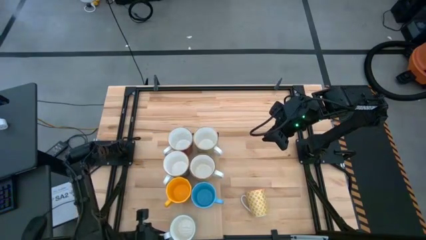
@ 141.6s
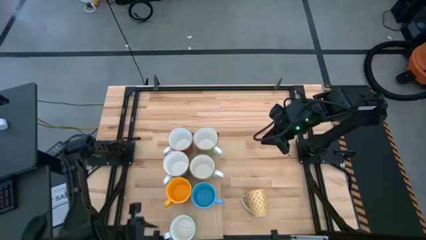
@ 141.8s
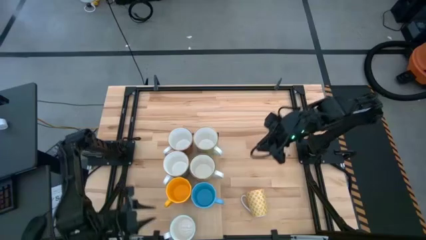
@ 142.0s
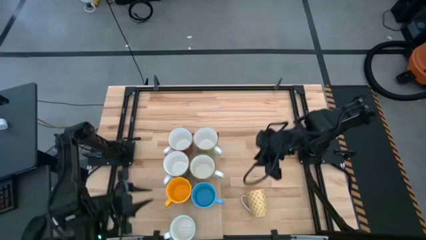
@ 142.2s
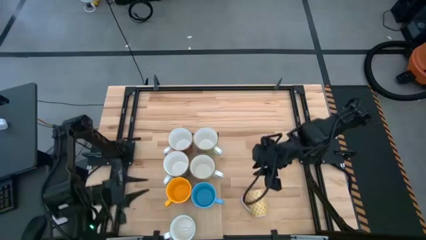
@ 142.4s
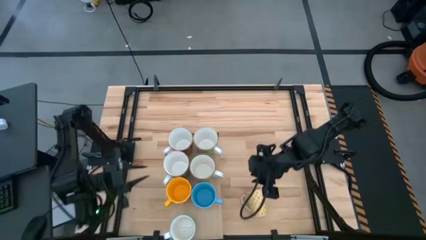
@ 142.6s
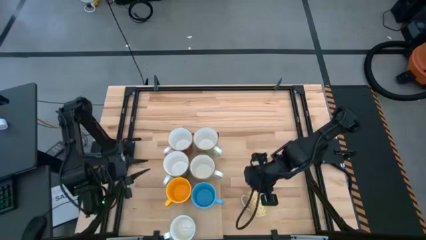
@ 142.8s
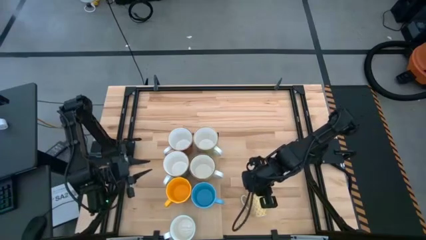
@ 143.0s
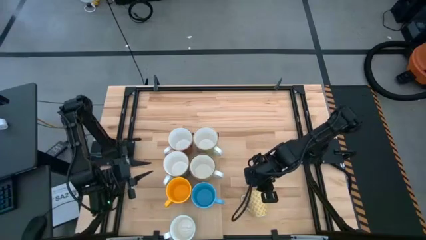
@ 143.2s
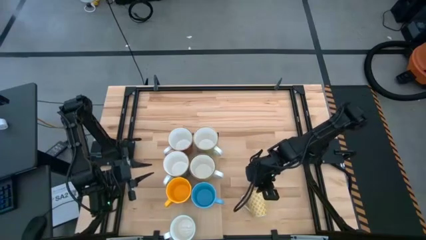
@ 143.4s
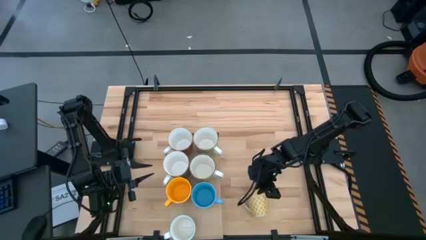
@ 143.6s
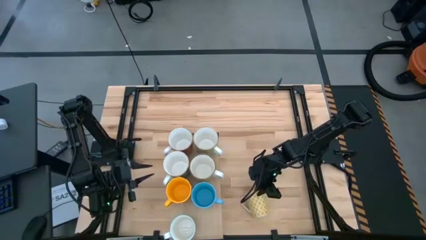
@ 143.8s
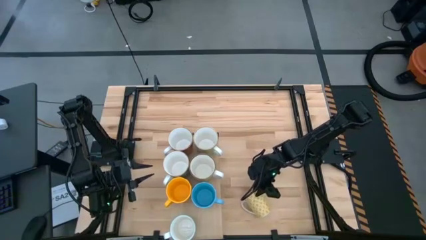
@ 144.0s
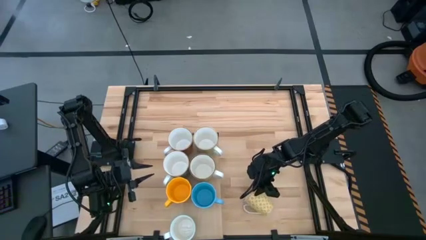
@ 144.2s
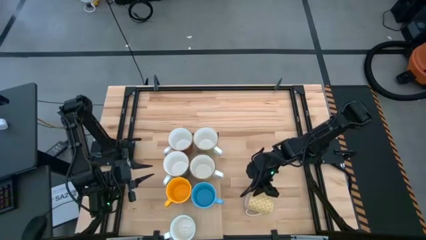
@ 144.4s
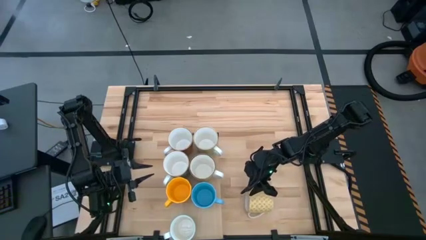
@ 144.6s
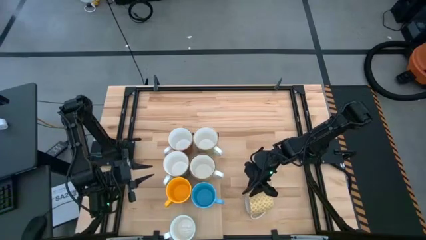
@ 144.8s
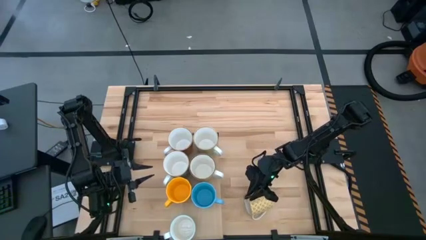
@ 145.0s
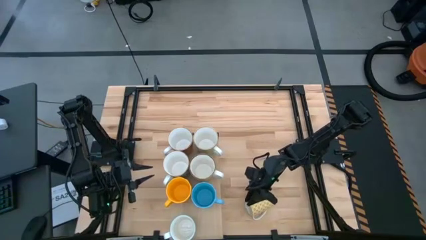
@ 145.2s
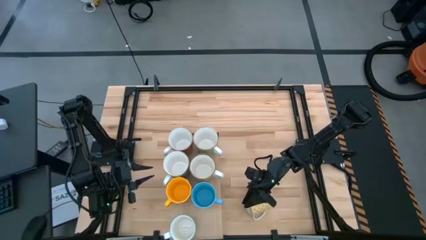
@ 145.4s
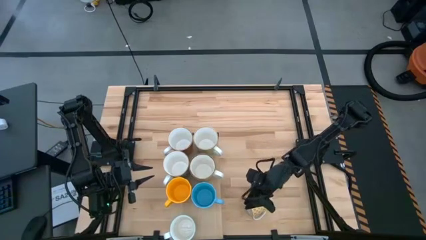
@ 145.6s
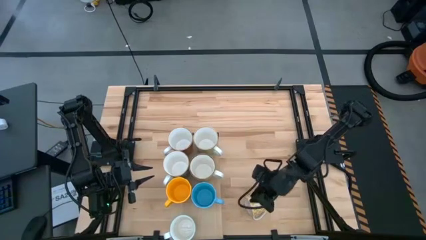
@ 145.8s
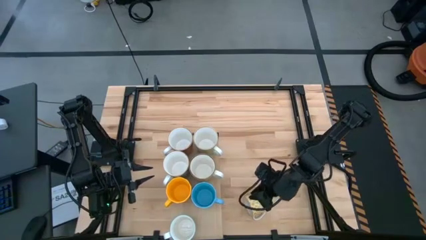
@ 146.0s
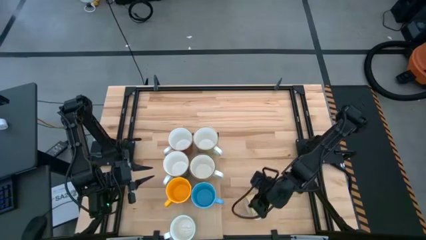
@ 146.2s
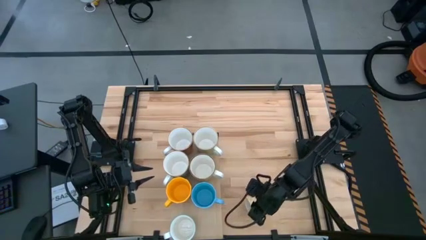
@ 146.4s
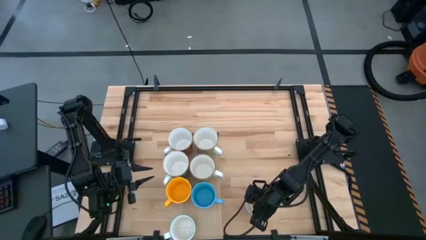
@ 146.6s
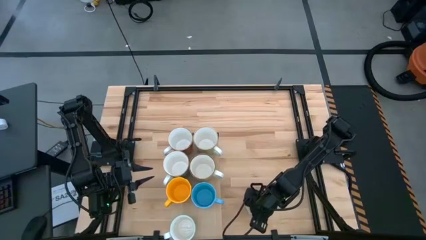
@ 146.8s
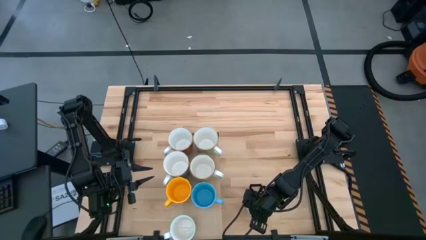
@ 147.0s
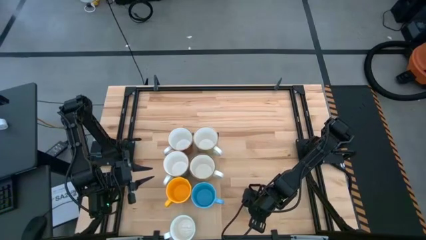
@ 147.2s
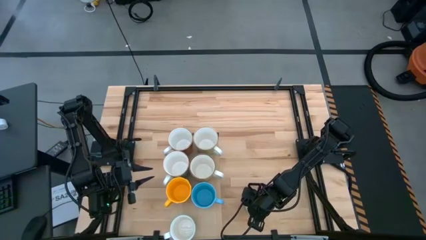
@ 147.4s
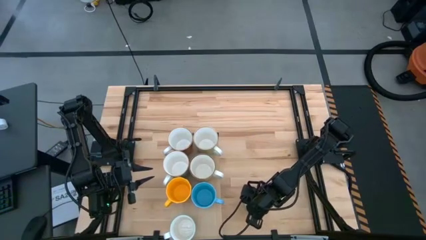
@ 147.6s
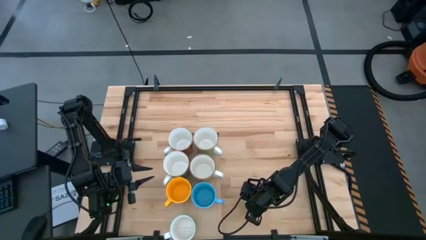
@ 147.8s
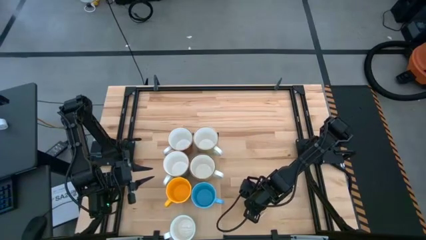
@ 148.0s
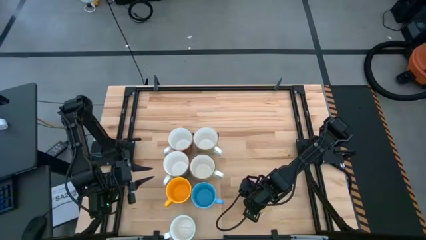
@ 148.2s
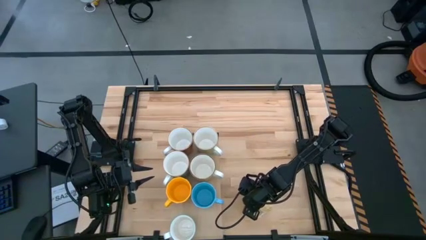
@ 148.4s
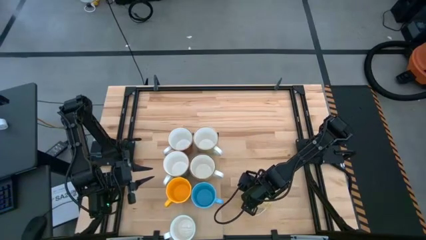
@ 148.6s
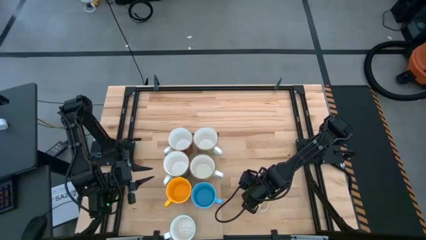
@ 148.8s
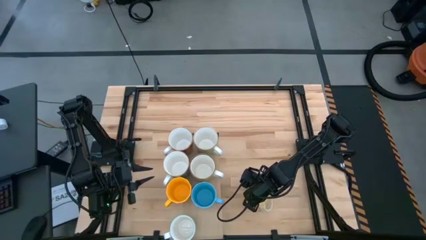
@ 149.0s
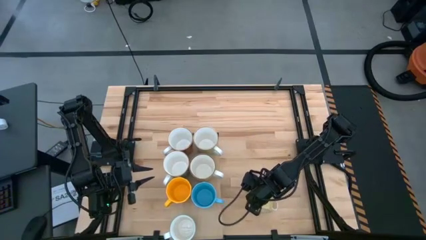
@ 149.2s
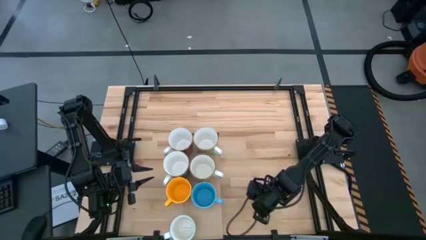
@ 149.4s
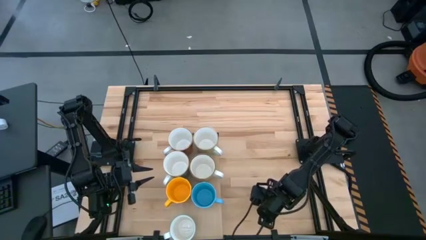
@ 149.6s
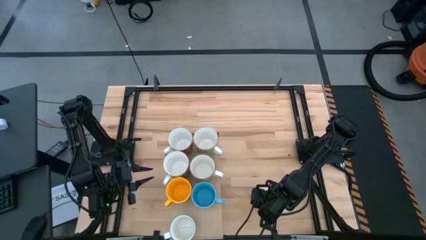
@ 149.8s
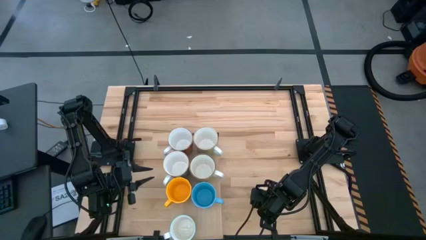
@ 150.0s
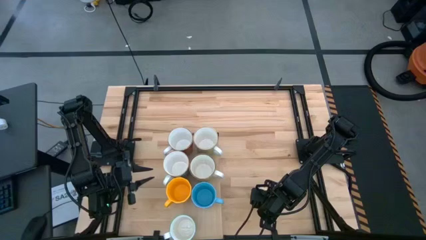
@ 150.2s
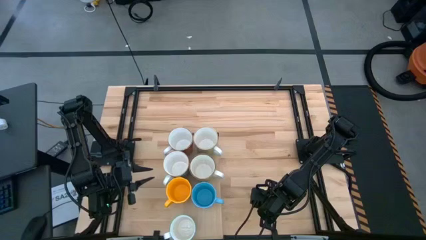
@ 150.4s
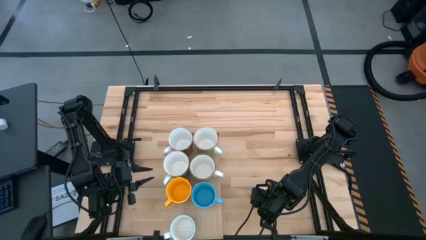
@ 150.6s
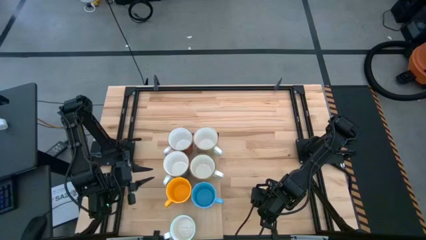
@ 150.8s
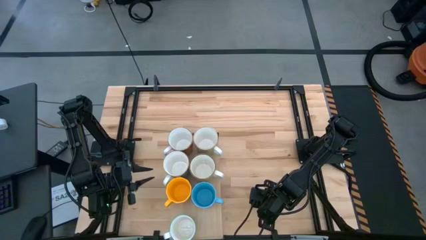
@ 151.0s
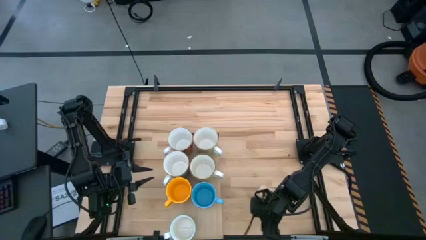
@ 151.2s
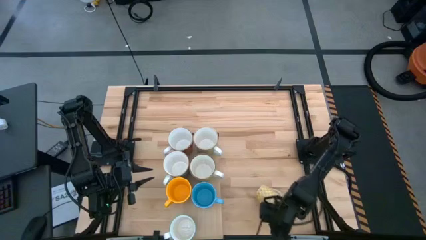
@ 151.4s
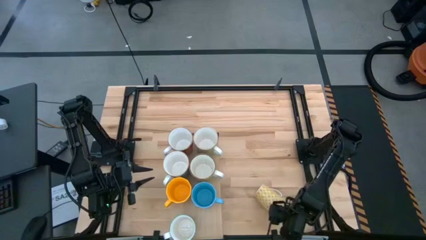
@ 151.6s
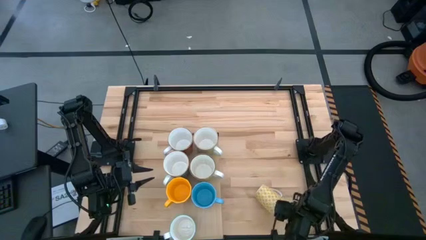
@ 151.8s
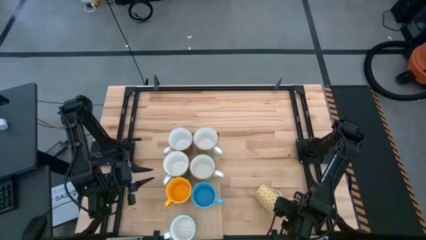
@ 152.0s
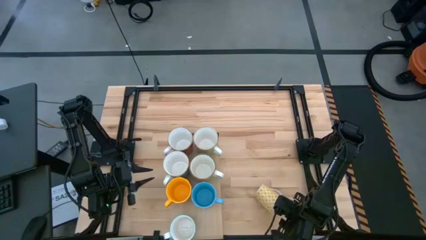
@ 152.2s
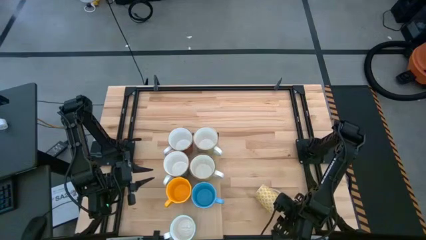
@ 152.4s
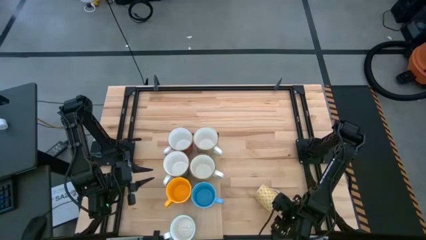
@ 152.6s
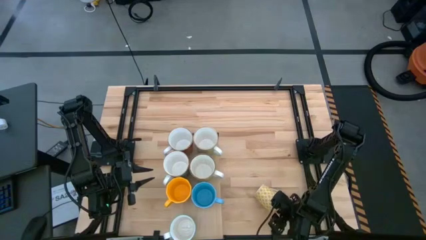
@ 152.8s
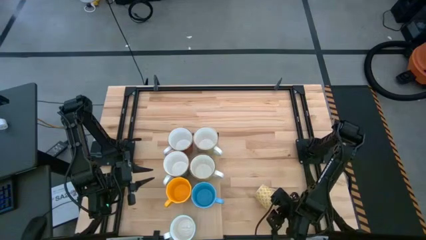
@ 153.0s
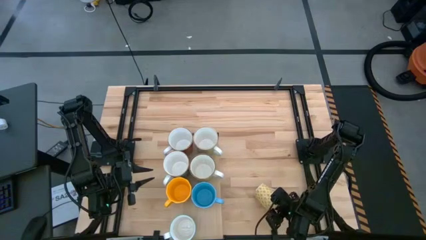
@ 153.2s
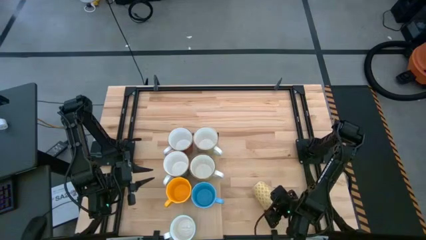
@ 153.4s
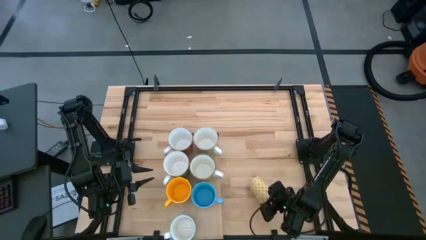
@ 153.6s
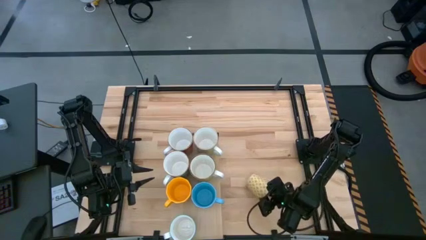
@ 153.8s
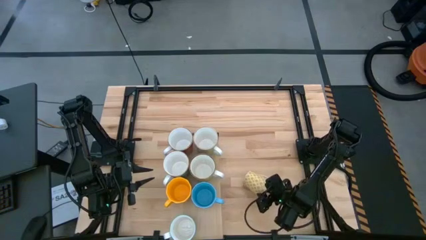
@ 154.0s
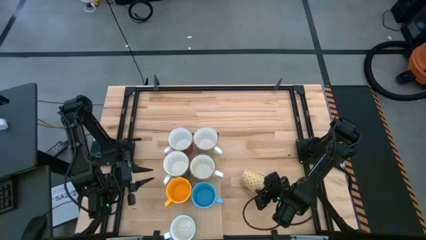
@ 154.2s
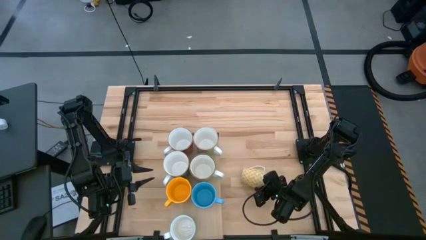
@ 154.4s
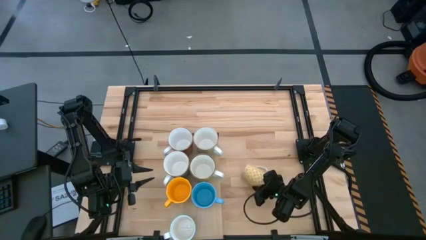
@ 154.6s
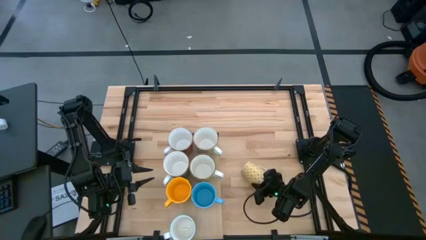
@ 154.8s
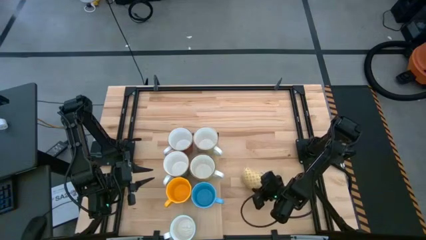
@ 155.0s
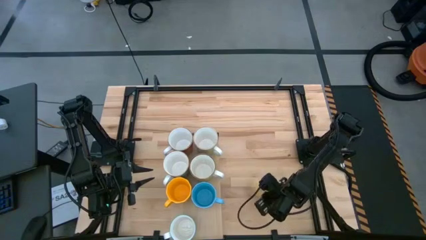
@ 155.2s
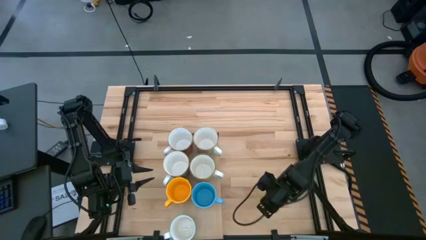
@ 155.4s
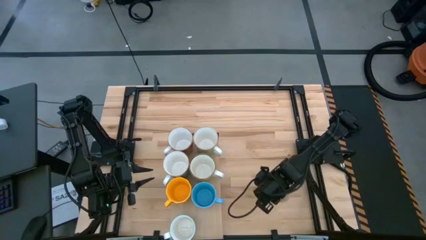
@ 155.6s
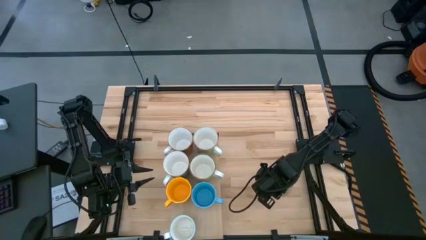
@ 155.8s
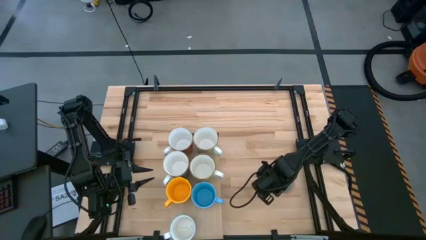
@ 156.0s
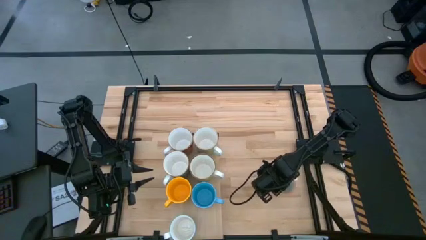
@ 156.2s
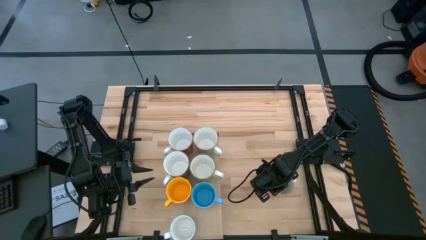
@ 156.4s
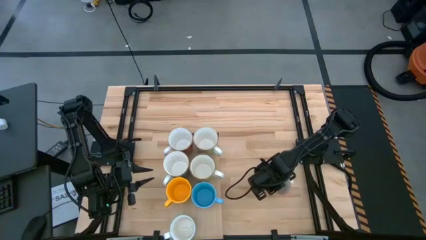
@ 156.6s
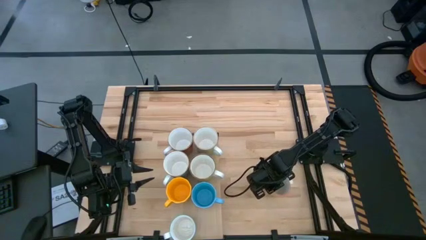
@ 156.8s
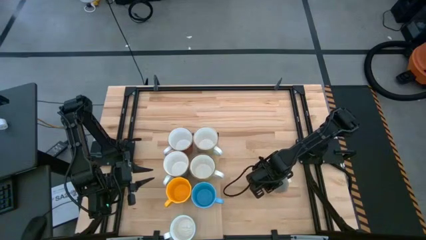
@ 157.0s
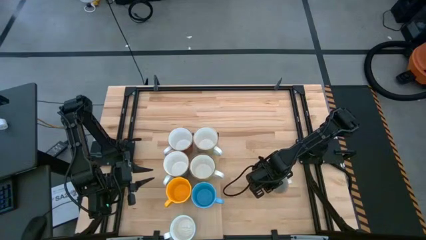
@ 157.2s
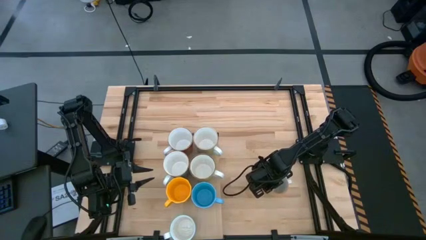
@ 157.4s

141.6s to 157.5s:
Task: Place coffee mugs
Put the yellow mug on the shelf aligned with the blue mug
